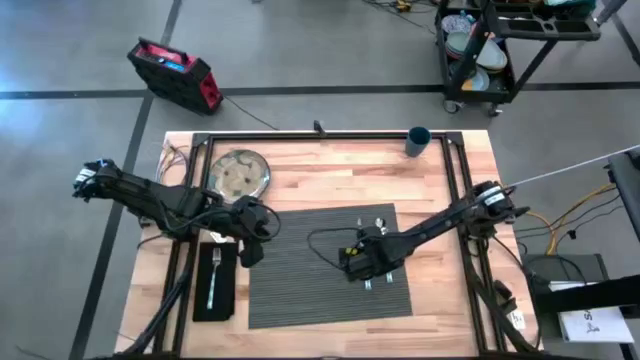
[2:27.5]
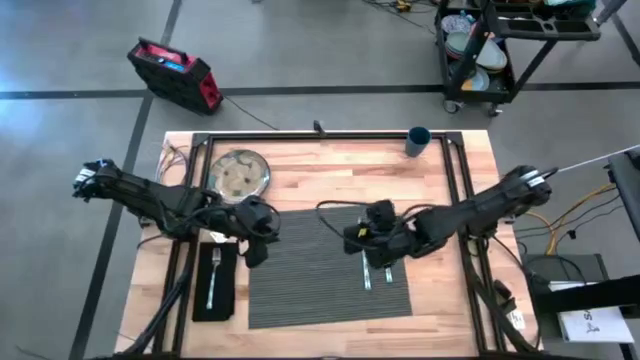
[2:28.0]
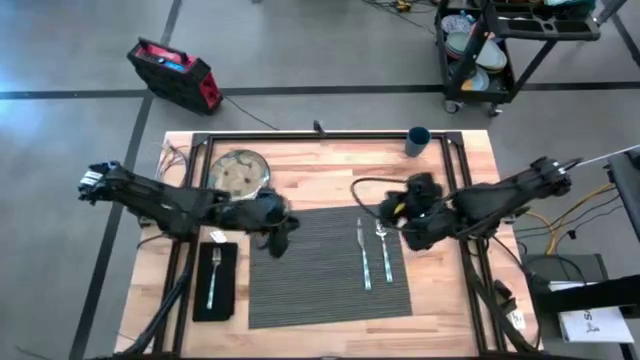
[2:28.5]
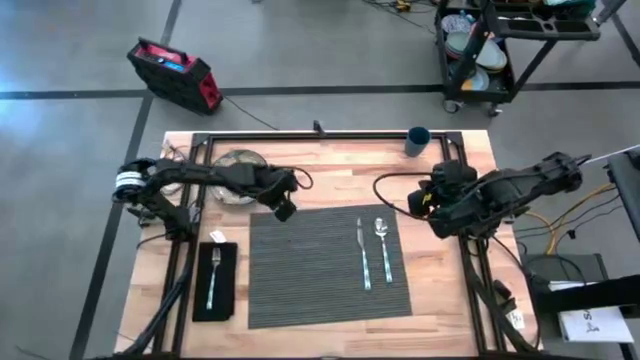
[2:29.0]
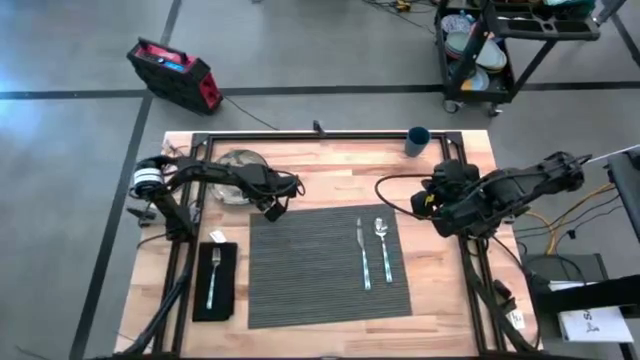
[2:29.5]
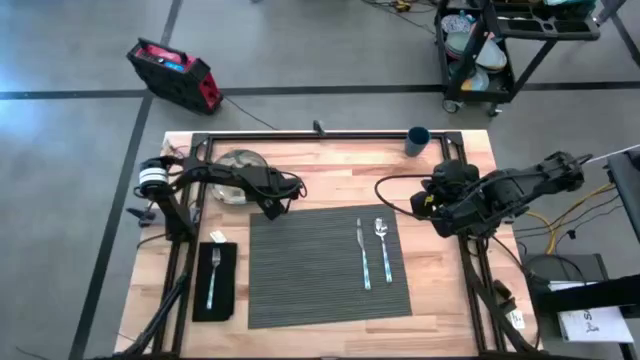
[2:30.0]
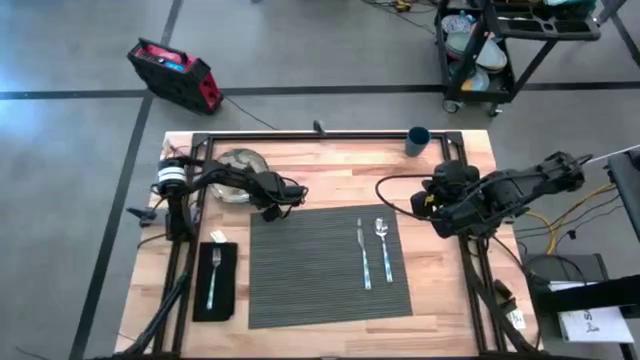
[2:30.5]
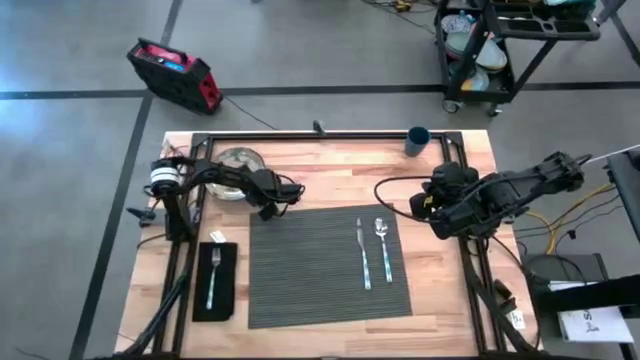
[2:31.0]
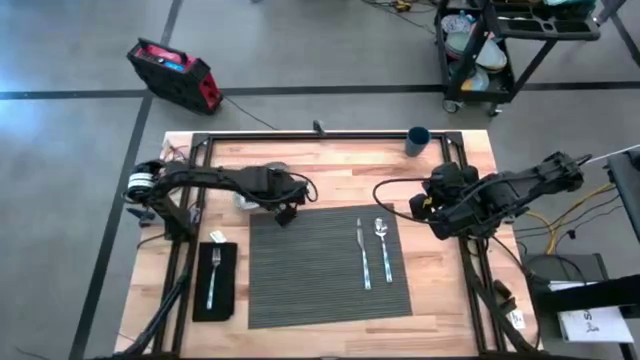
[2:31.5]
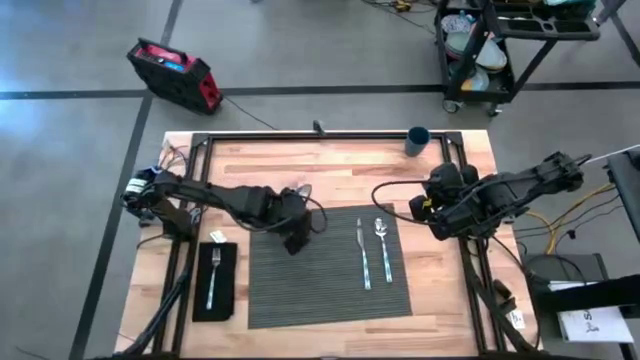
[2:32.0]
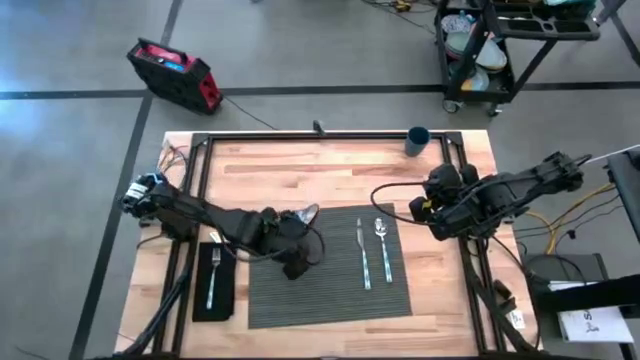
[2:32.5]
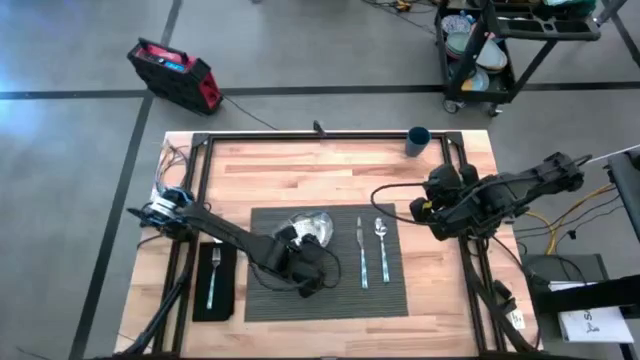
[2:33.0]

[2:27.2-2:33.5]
Task: Set table place
Put the white and blue plate on the dark blue table mat

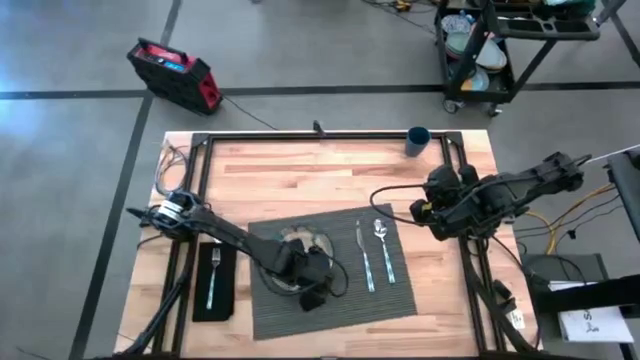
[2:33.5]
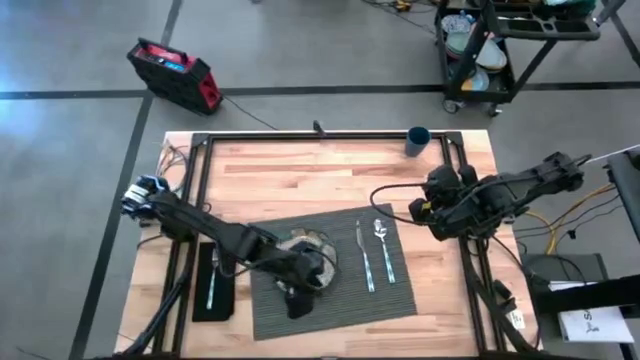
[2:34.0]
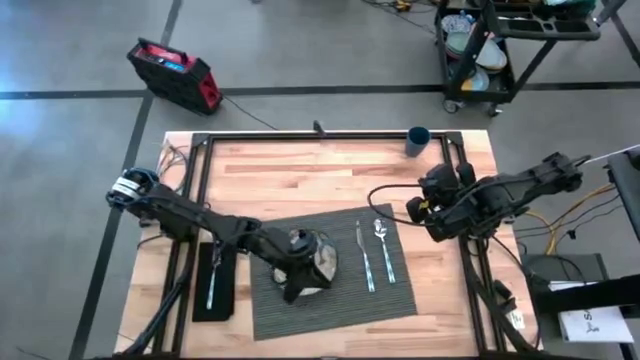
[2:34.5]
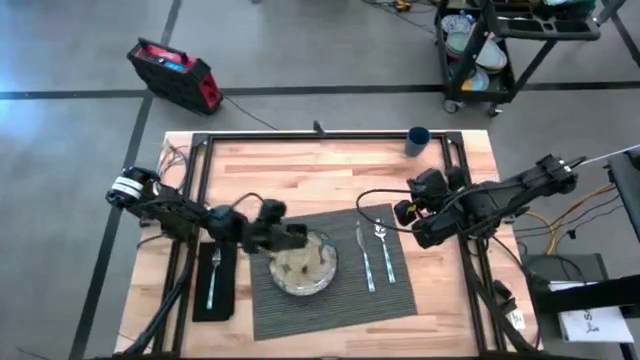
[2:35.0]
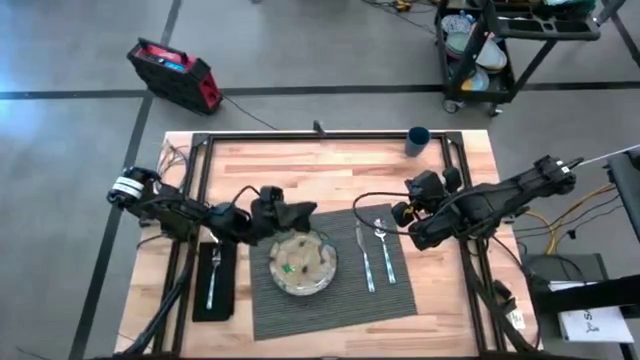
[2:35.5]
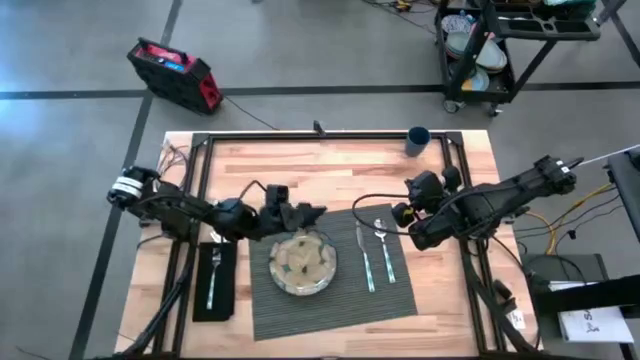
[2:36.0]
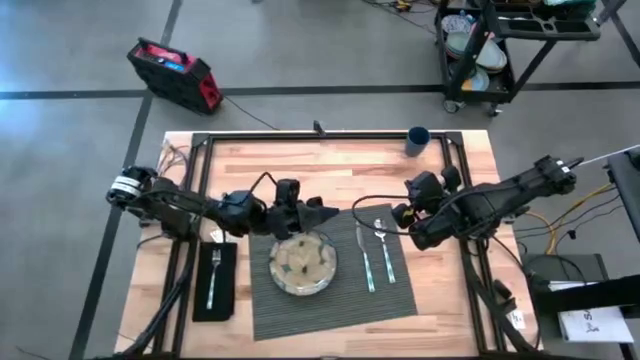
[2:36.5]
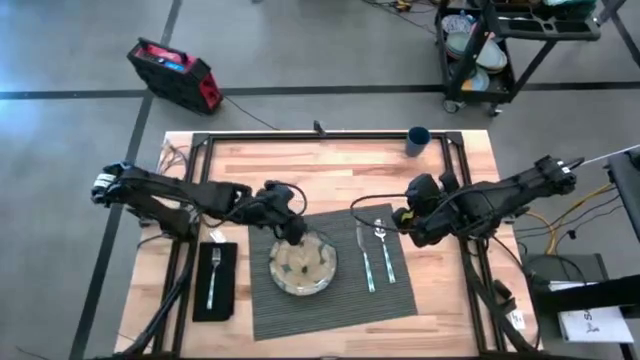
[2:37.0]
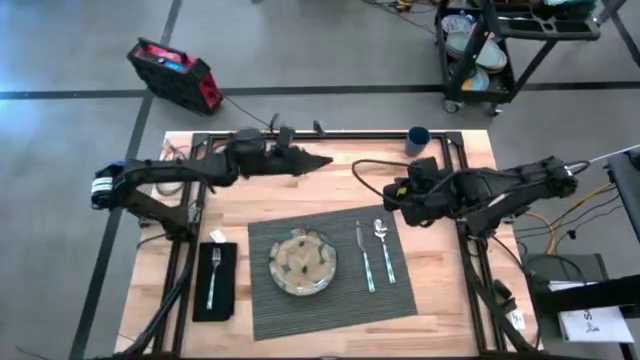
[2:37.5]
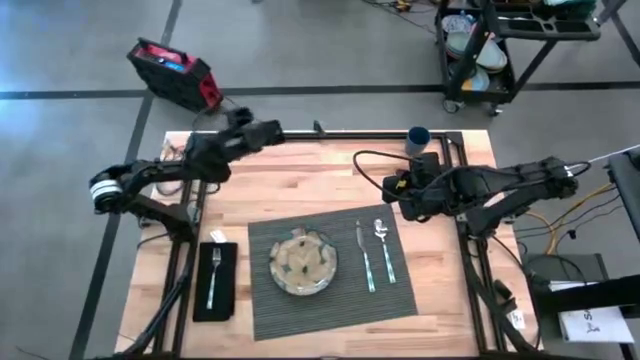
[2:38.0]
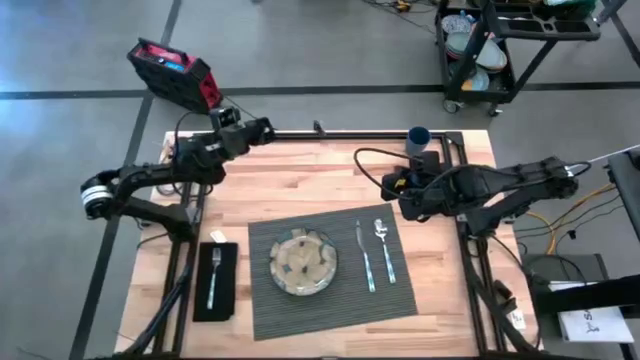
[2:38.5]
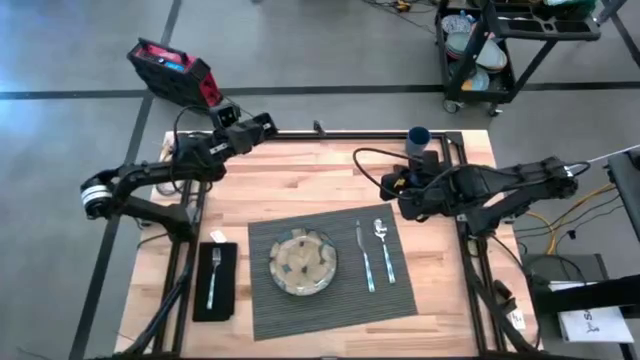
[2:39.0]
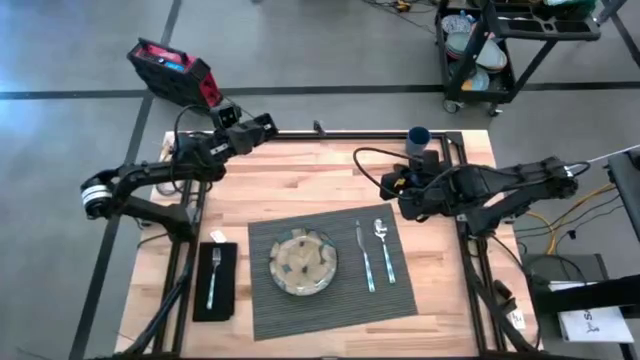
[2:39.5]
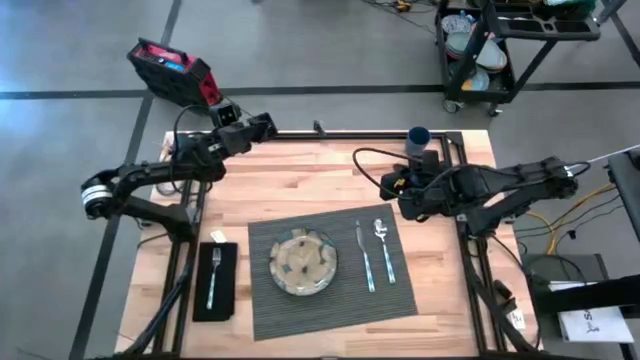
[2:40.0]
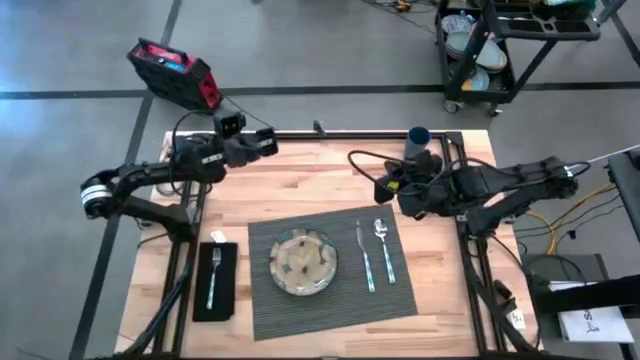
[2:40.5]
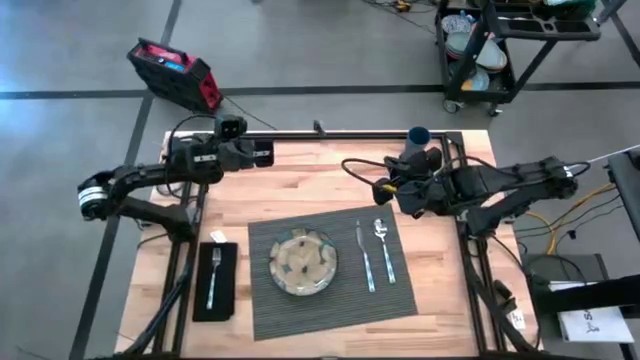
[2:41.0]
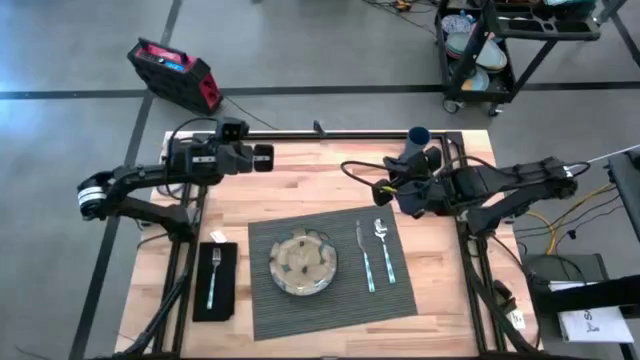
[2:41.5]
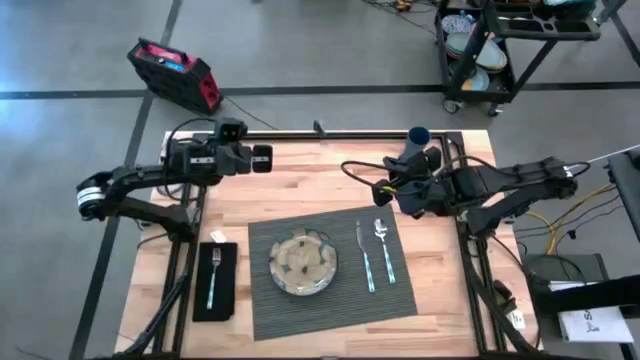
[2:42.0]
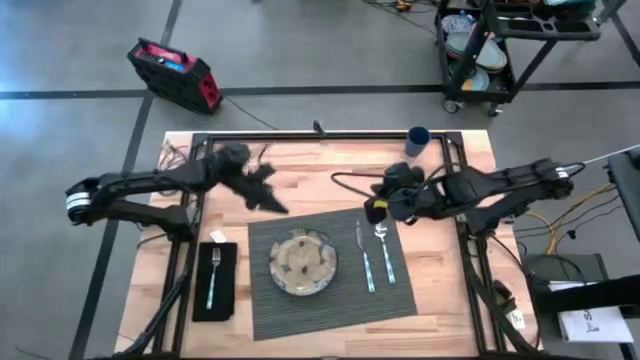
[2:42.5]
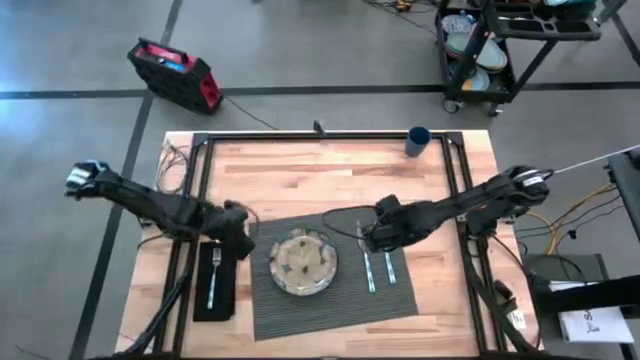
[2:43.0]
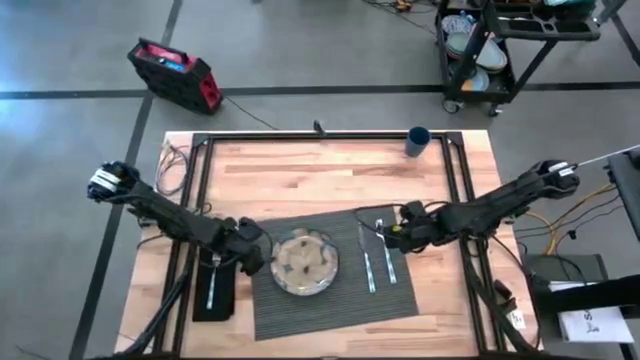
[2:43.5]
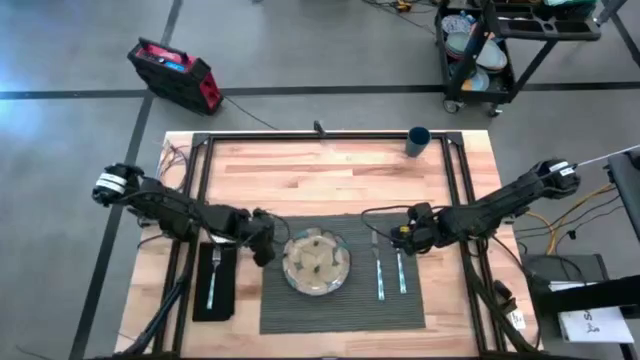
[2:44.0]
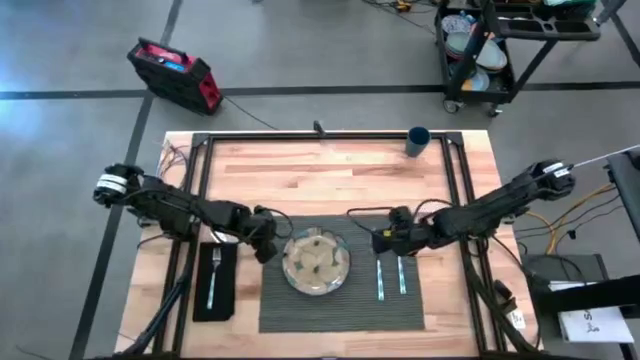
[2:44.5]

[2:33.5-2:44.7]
Adjust the dark blue table mat

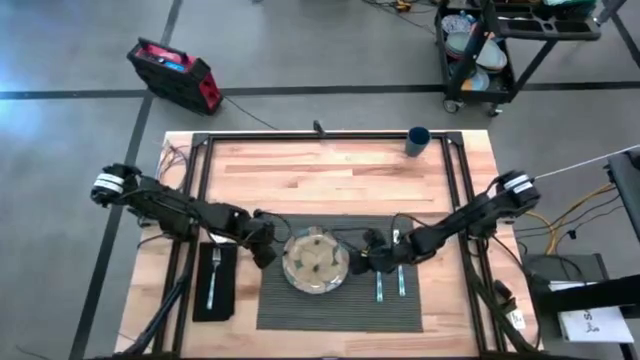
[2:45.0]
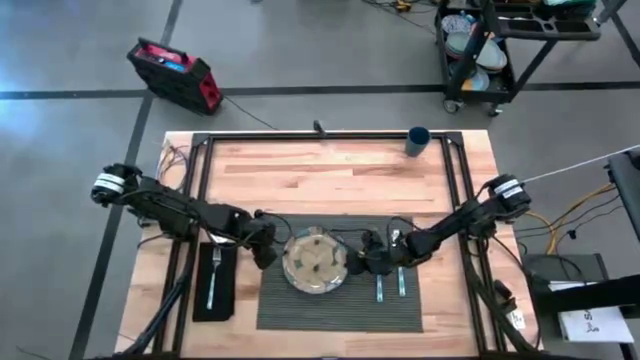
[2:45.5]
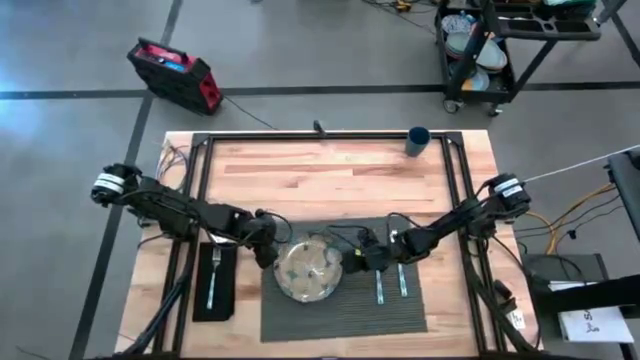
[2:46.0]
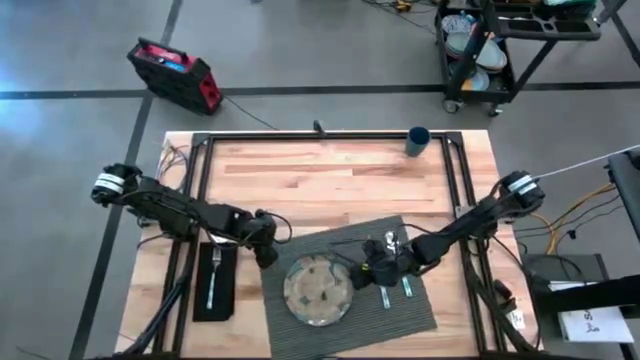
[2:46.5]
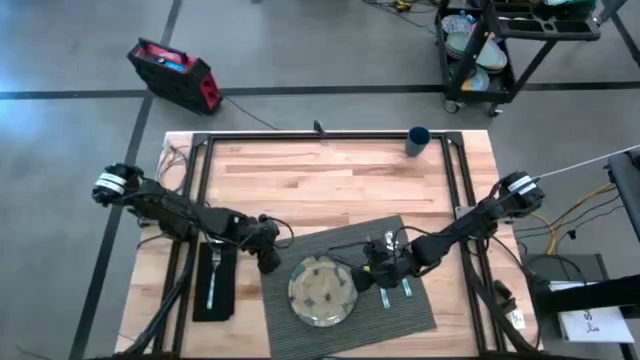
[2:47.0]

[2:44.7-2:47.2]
Adjust the white and blue plate on the dark blue table mat

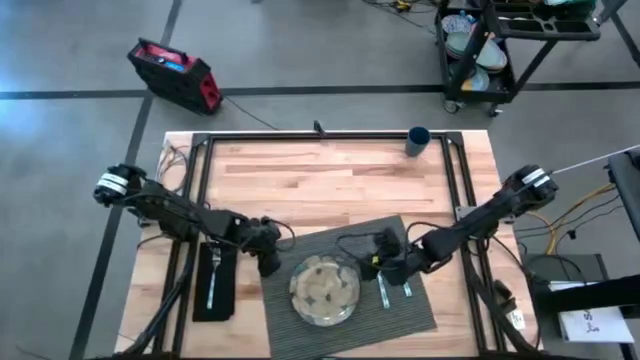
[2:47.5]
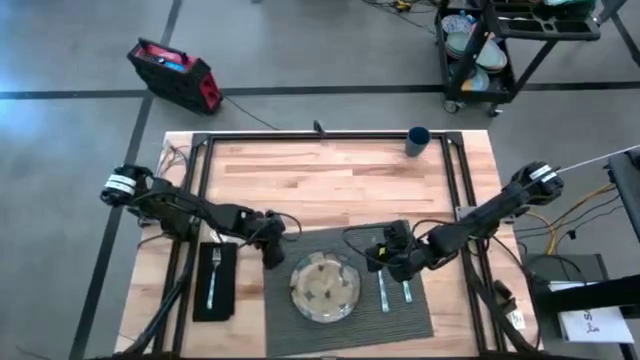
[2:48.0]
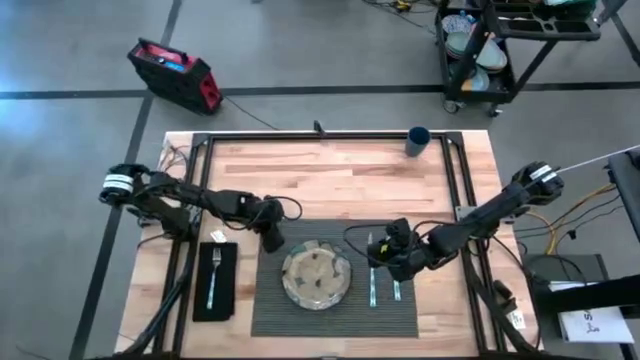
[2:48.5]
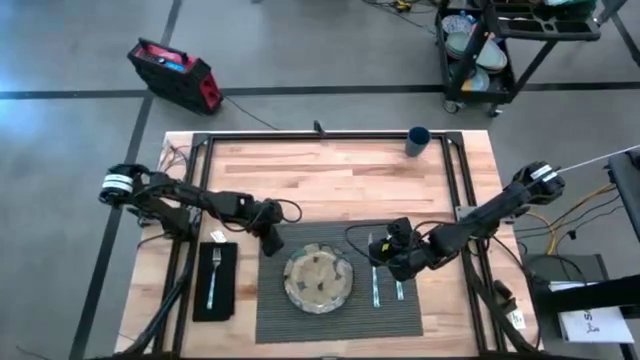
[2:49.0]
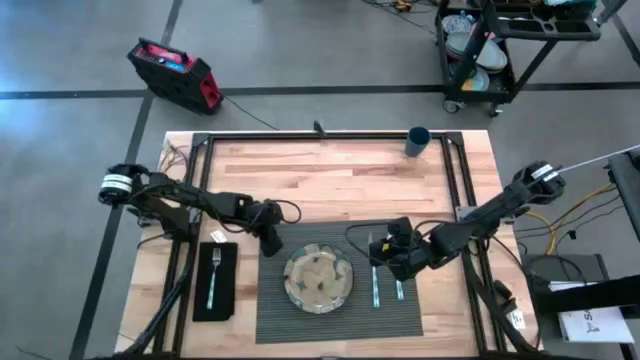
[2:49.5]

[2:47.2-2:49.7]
Adjust the dark blue table mat
